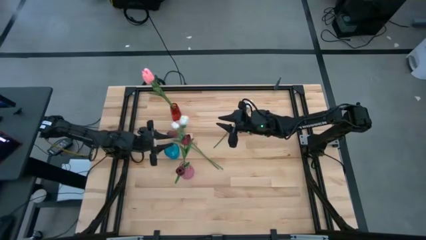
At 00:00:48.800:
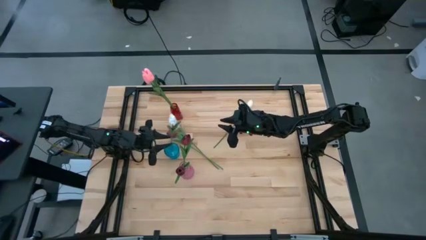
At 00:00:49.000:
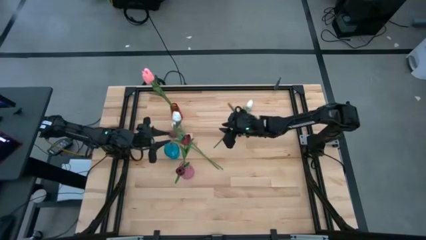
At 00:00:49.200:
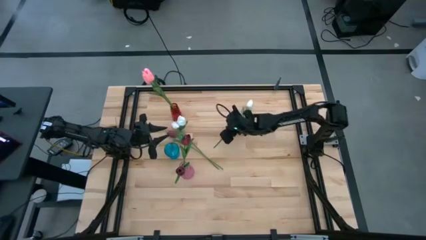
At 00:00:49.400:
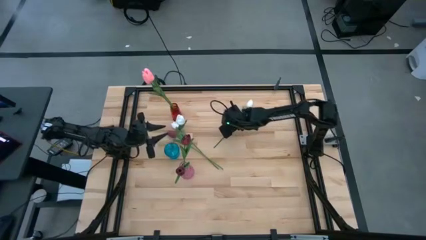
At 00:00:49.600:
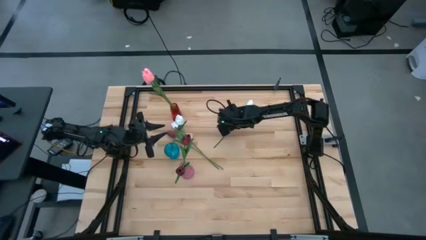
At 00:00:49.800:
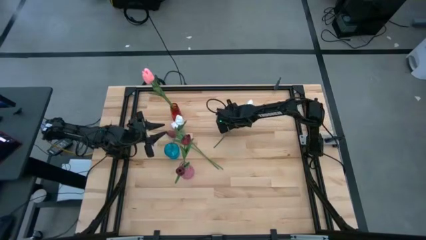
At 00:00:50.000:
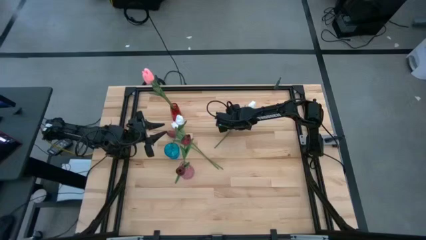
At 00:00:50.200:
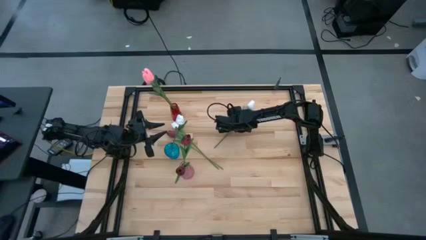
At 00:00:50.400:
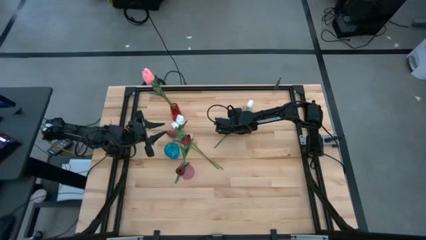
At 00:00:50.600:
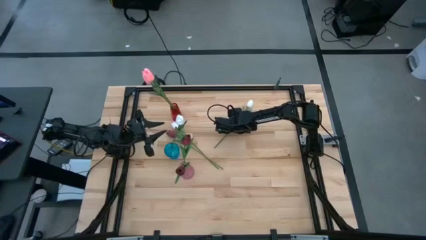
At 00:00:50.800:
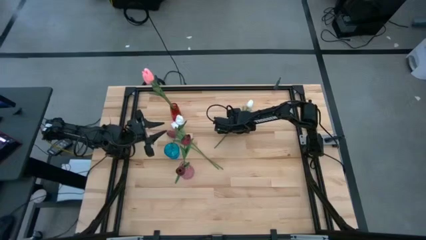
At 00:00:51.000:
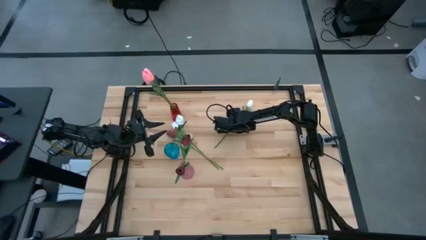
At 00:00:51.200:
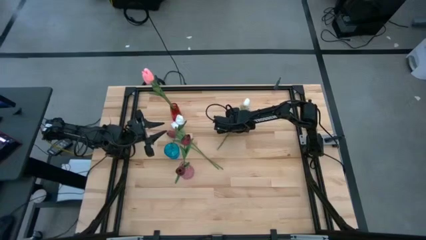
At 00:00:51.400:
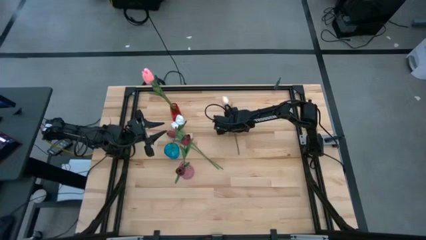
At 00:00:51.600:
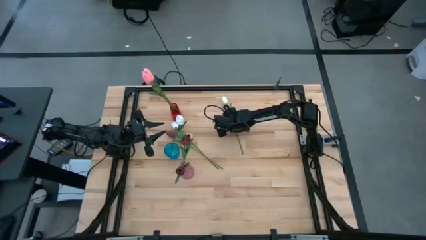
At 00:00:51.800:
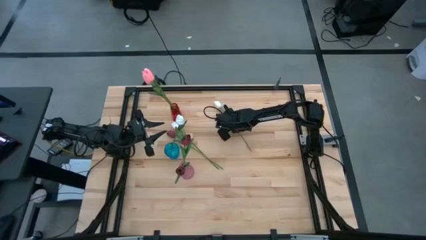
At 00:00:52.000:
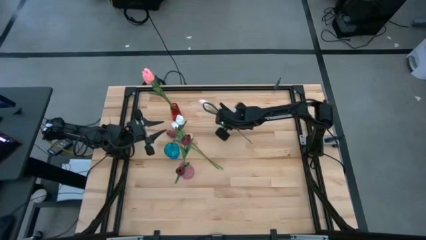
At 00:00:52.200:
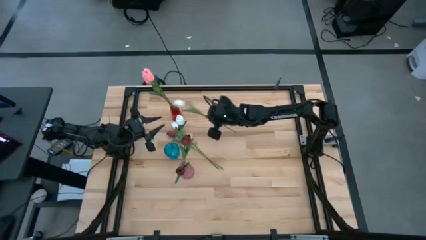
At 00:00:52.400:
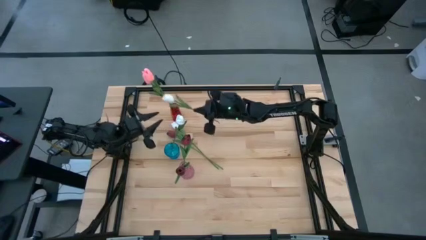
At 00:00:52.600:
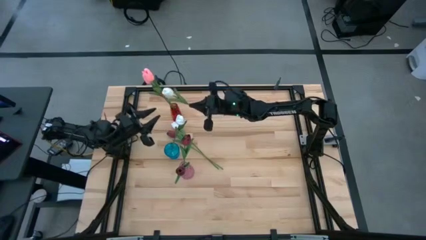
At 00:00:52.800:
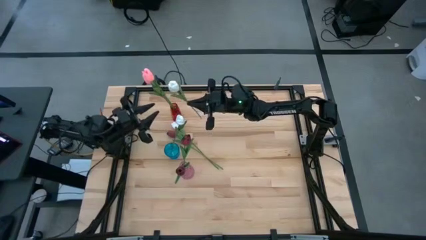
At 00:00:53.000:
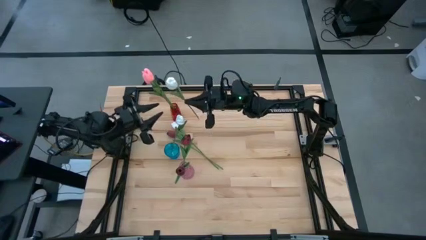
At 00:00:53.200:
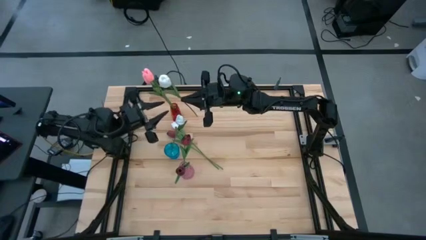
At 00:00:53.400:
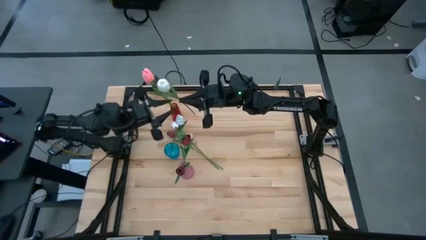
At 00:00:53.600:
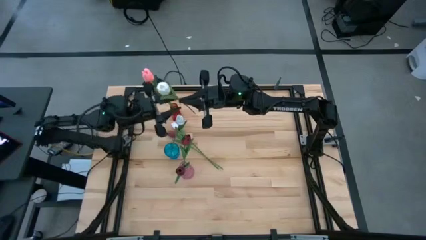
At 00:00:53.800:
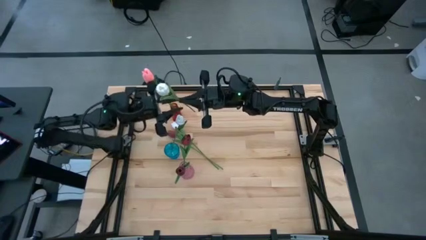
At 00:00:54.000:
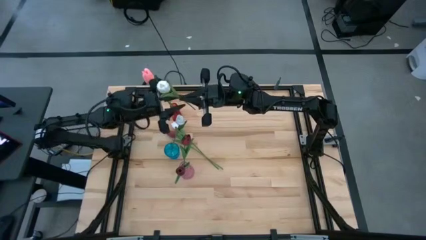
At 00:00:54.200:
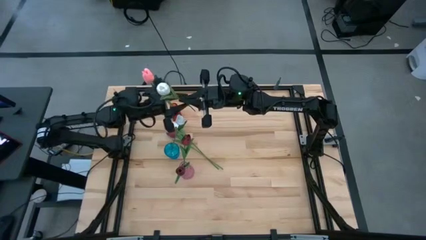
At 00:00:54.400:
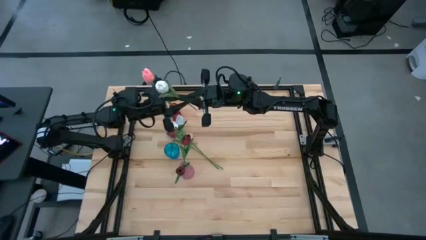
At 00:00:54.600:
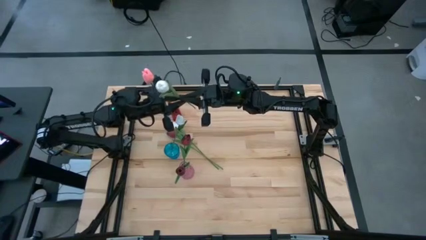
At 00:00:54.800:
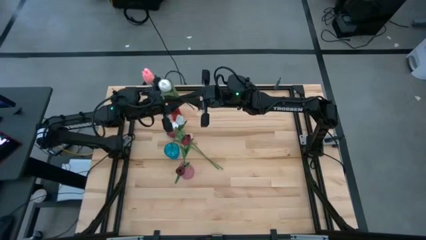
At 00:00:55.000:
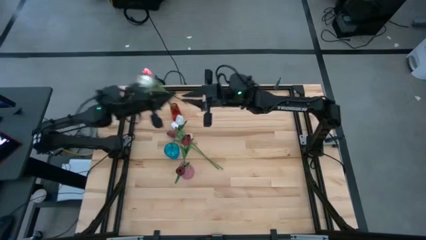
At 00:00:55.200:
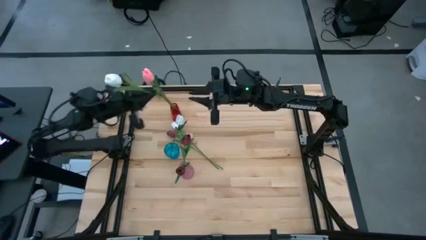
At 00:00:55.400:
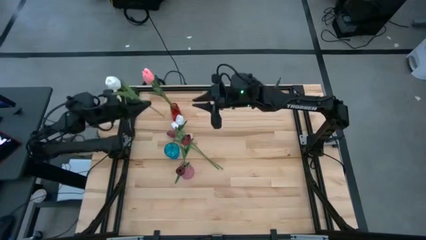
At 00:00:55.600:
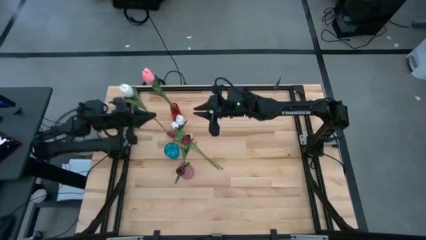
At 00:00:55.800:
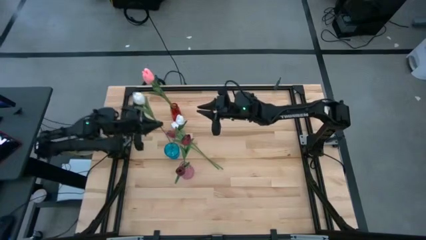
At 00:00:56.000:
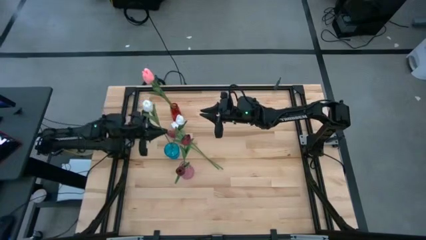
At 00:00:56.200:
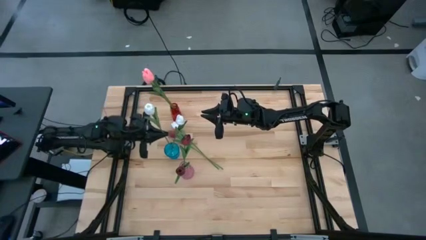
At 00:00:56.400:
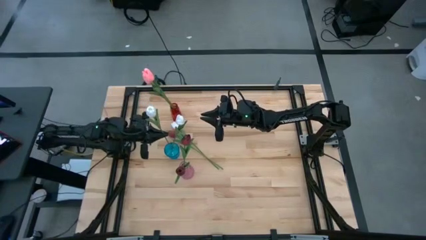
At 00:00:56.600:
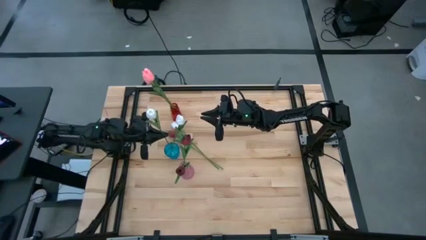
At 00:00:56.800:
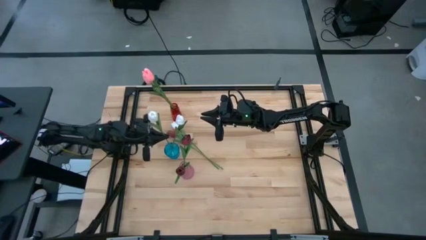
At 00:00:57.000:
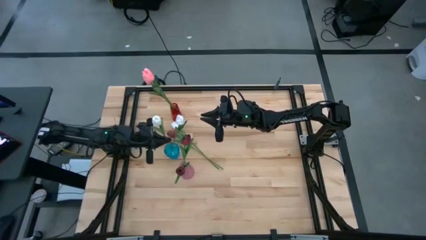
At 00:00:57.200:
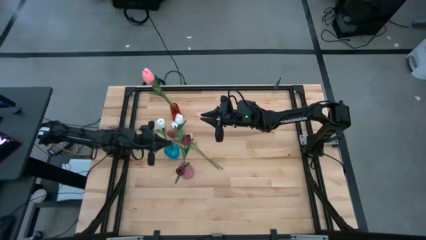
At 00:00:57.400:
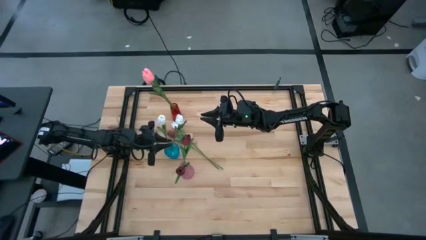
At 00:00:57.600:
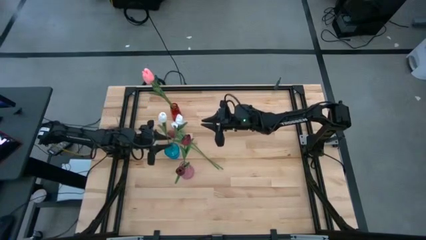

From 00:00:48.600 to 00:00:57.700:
Task: Sort flowers into vase by color
Put the right white tulip into the blue vase

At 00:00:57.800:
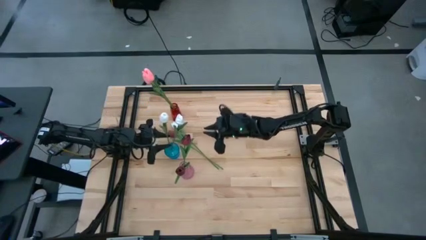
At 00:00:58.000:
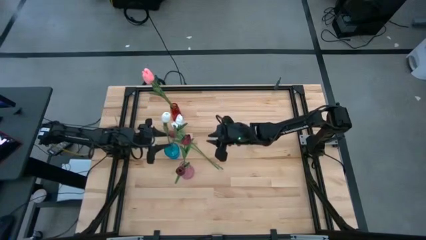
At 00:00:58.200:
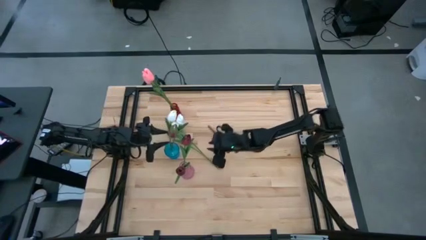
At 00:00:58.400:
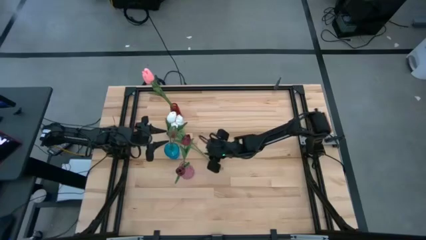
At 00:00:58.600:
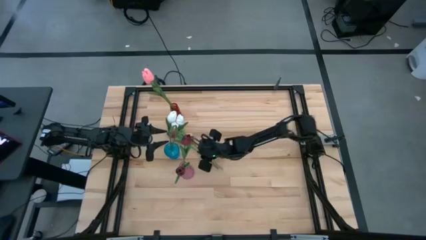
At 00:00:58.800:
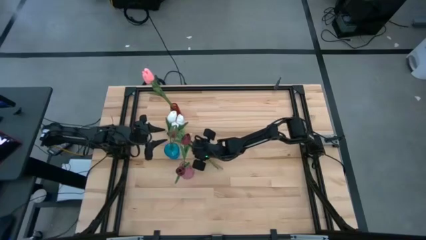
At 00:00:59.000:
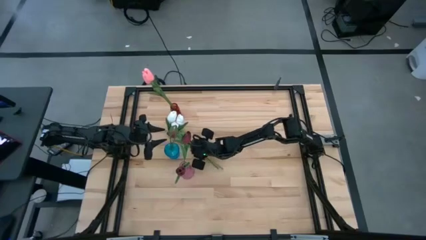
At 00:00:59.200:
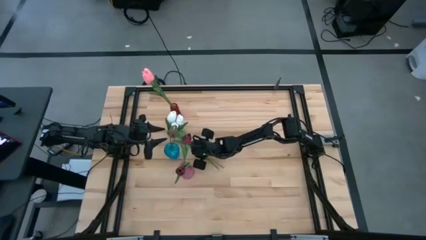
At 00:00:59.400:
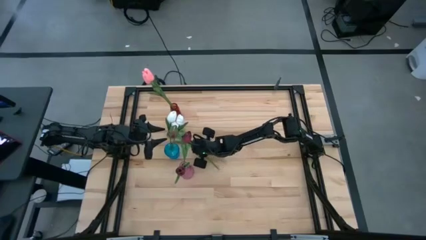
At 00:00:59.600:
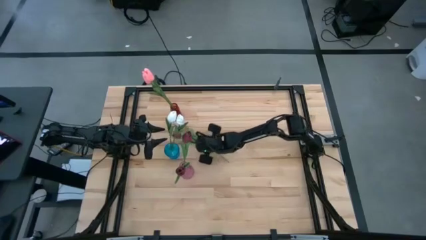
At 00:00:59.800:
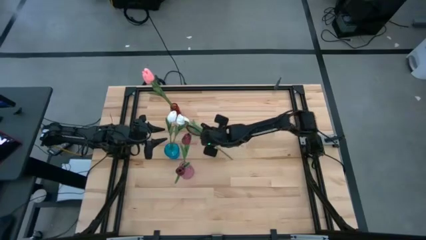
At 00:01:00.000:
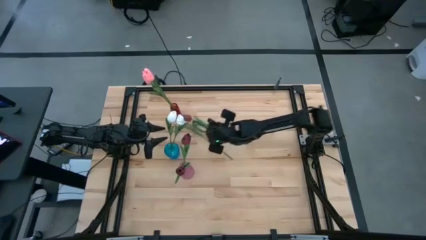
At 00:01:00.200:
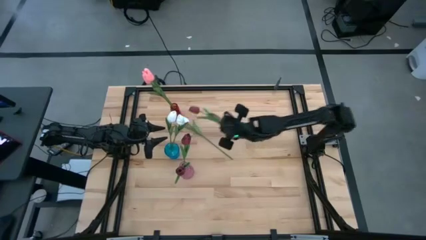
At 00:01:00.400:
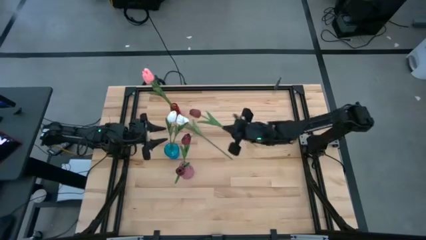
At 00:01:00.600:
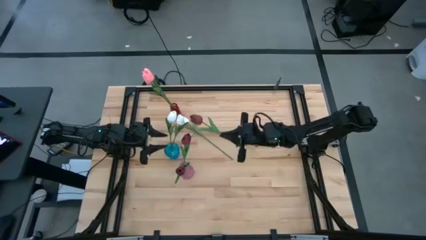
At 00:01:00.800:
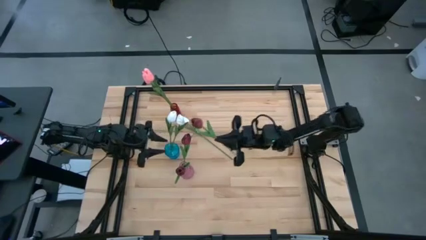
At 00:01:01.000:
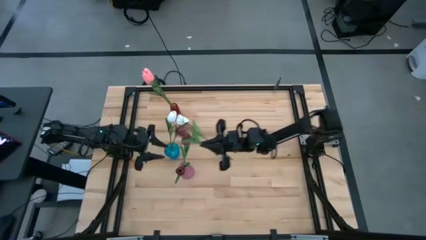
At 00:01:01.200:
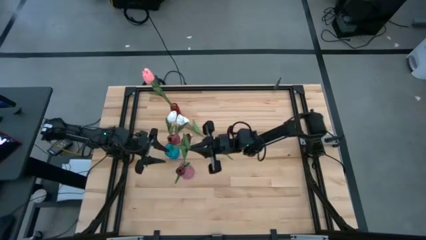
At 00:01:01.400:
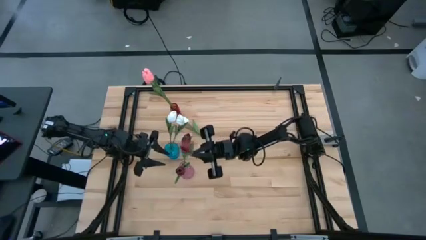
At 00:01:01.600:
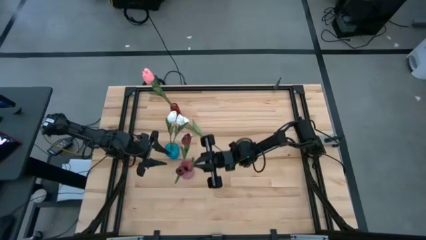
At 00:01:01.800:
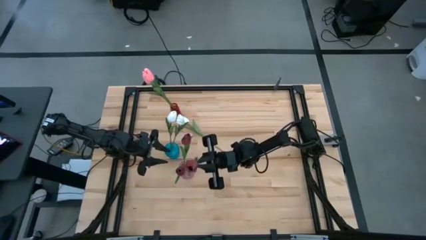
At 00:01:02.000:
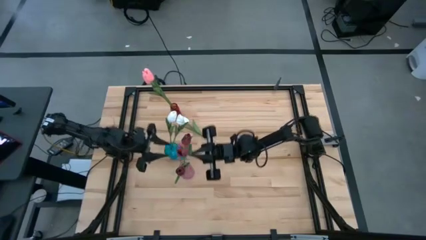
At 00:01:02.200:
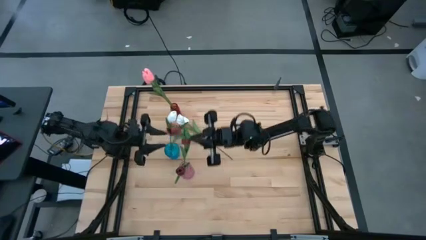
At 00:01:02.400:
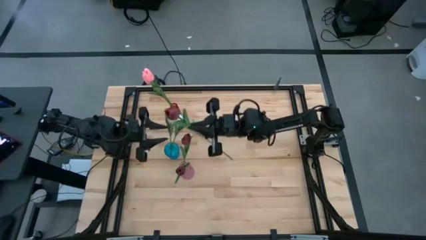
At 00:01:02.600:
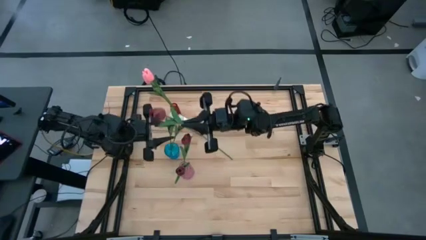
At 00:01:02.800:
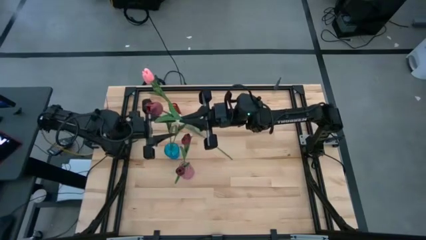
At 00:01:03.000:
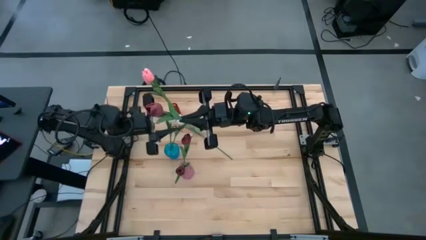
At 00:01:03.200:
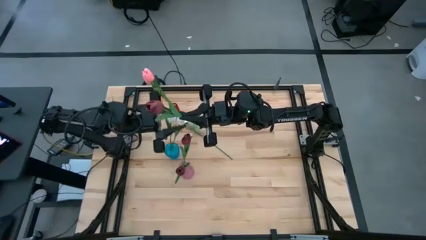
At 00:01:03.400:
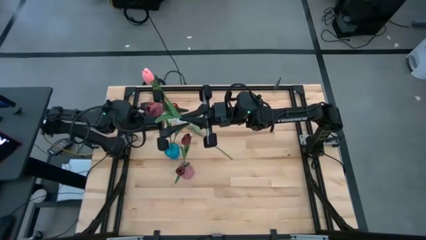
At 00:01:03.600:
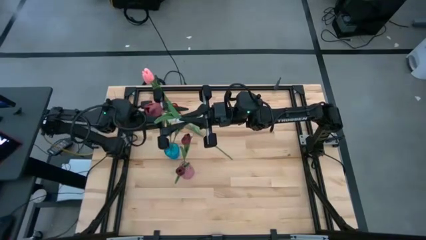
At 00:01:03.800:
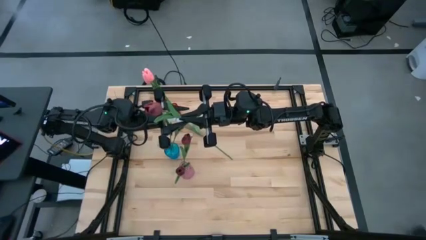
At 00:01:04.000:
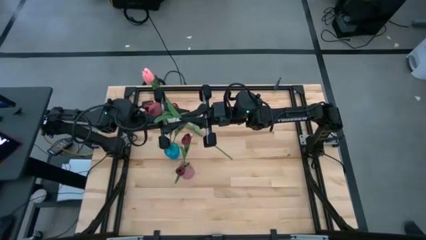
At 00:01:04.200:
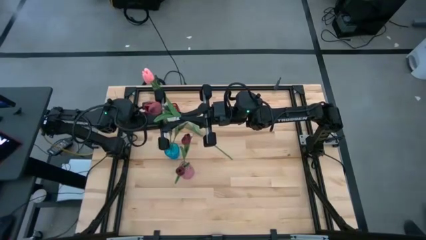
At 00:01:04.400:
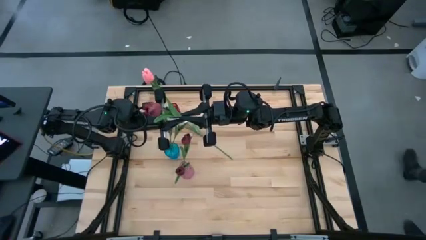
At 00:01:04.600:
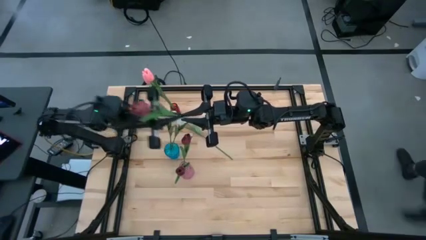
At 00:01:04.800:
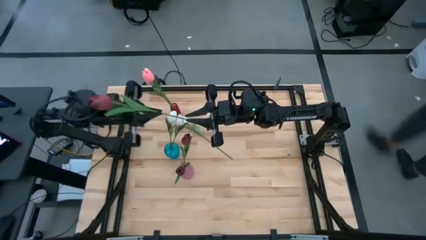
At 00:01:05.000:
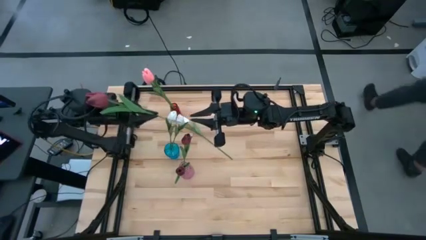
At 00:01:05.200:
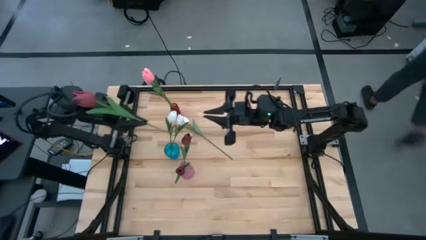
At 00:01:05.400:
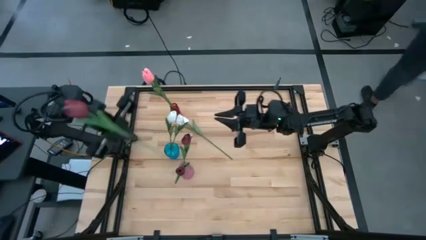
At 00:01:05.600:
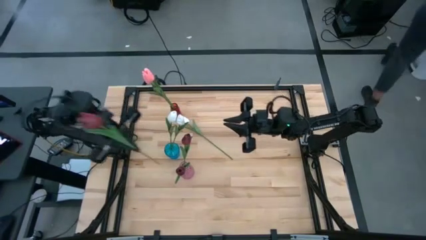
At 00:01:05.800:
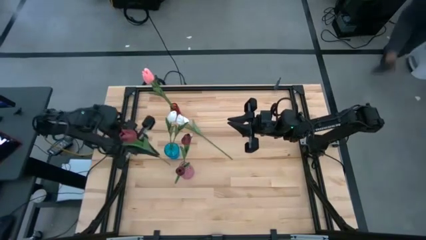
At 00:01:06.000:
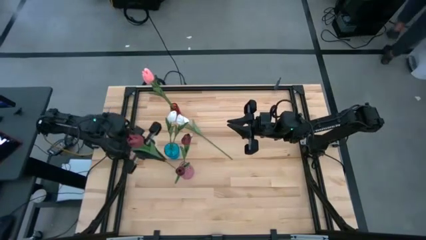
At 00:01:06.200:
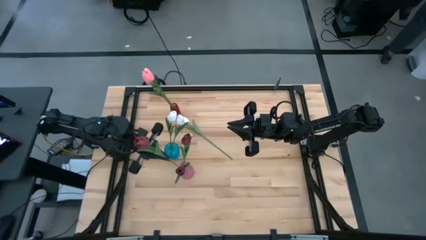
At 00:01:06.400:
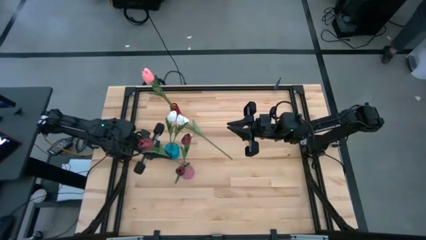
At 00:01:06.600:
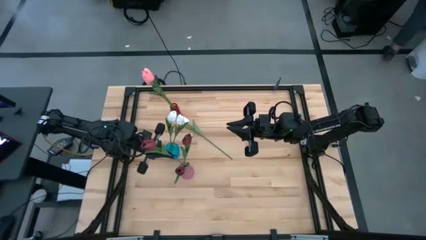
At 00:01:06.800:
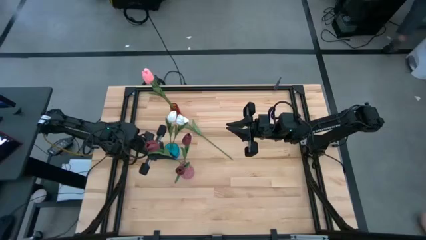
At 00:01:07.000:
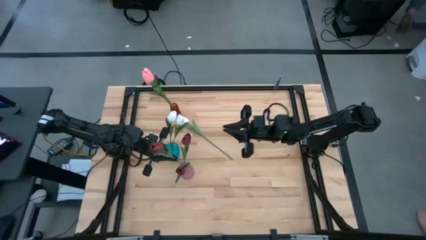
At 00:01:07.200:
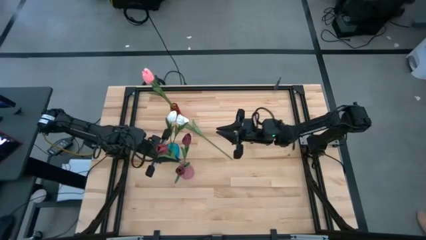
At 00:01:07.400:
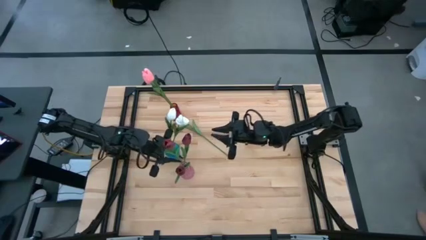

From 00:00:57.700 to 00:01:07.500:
Put the red tulip into the pink vase
